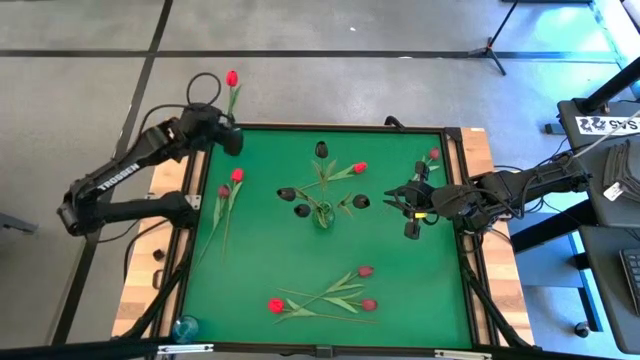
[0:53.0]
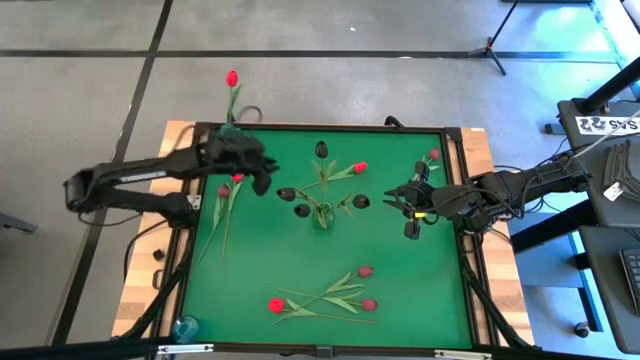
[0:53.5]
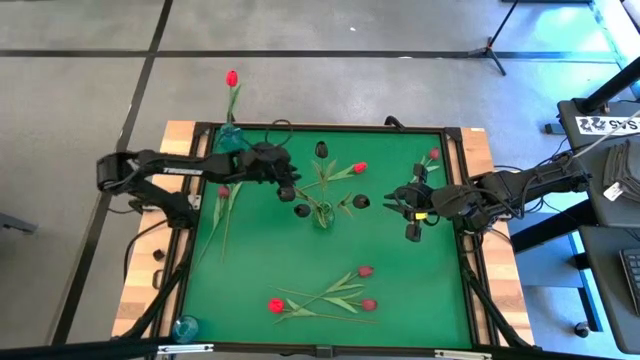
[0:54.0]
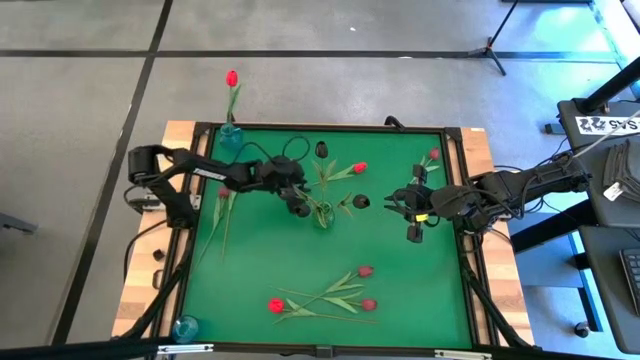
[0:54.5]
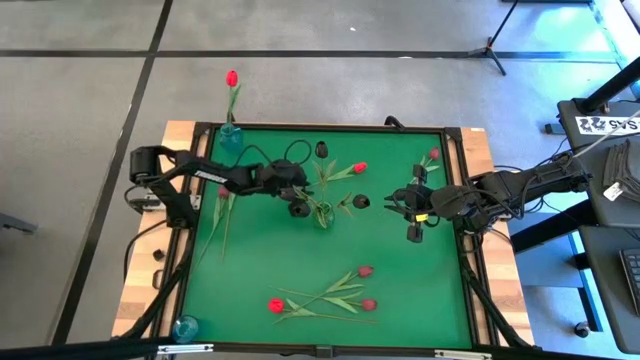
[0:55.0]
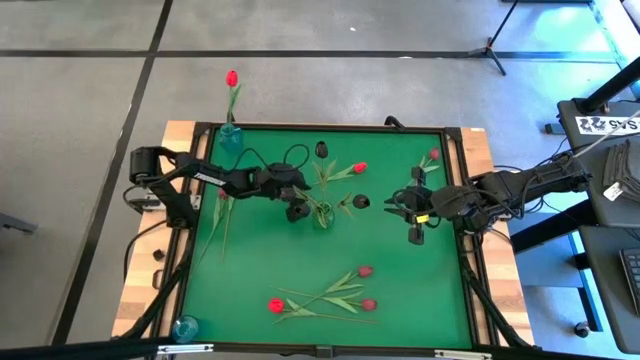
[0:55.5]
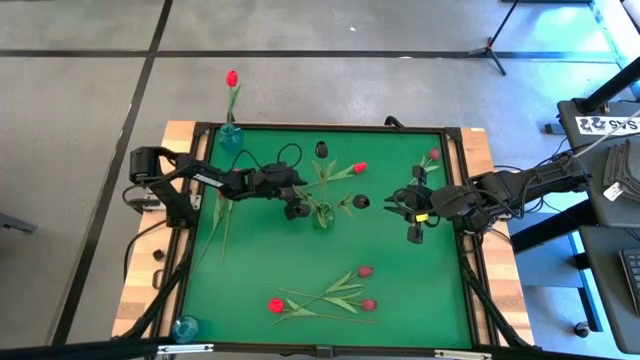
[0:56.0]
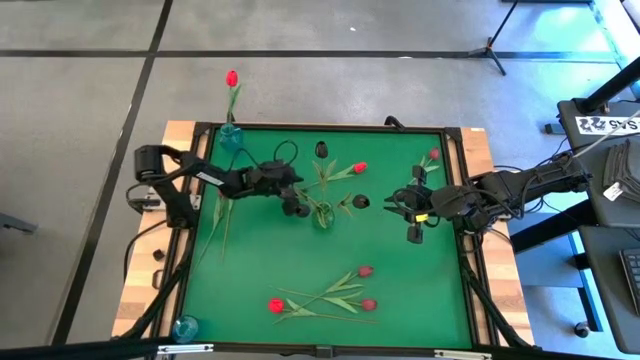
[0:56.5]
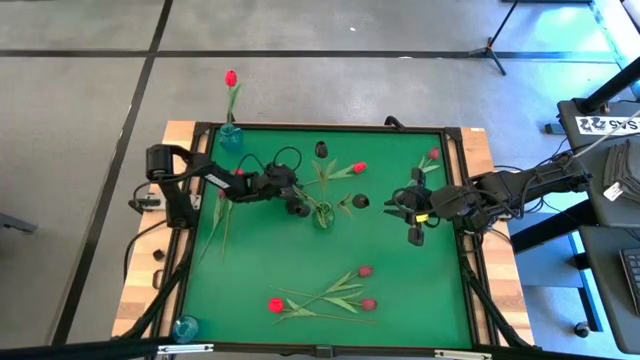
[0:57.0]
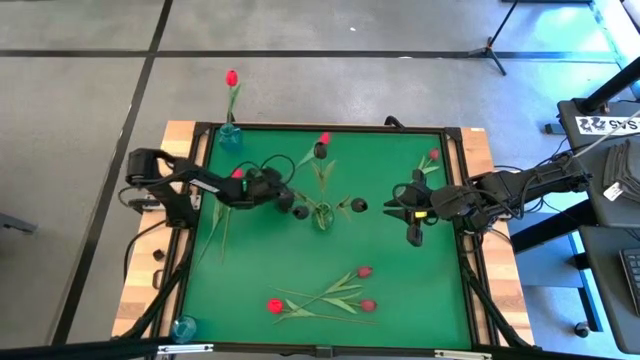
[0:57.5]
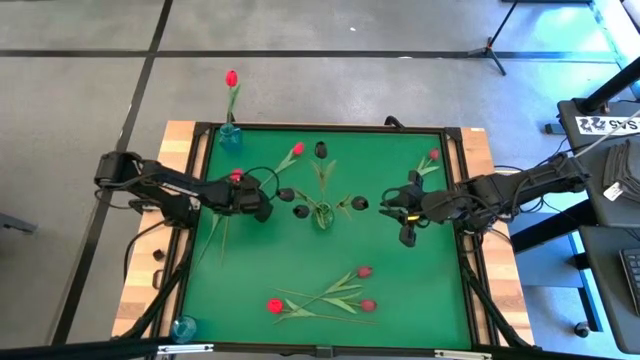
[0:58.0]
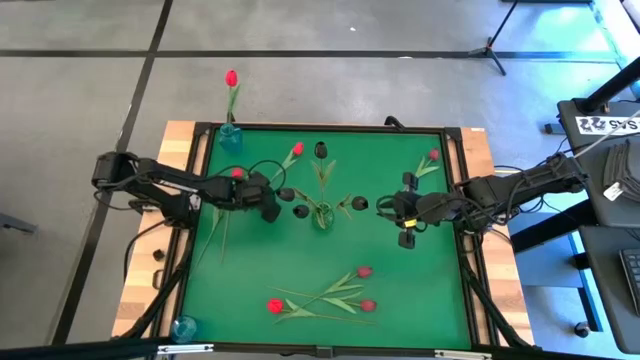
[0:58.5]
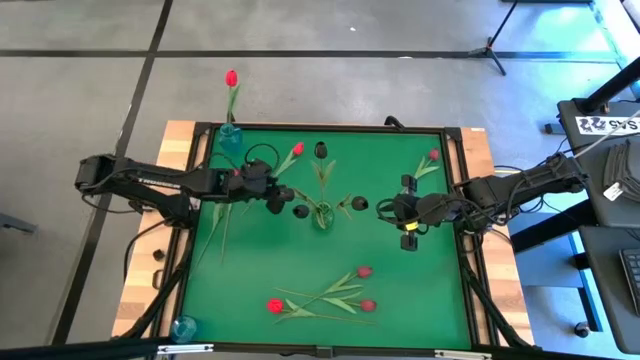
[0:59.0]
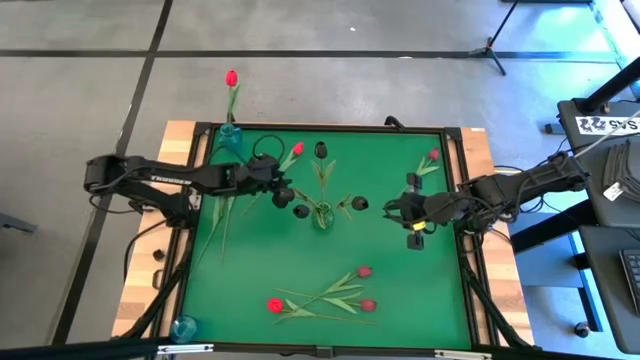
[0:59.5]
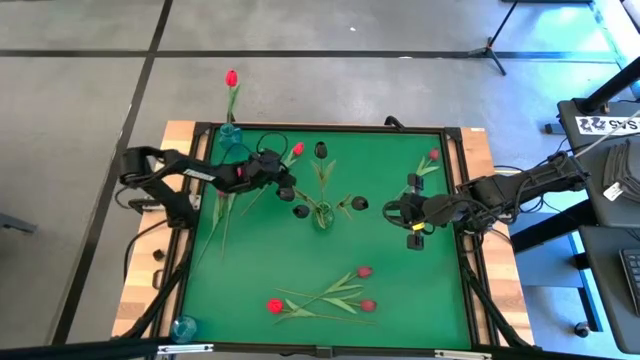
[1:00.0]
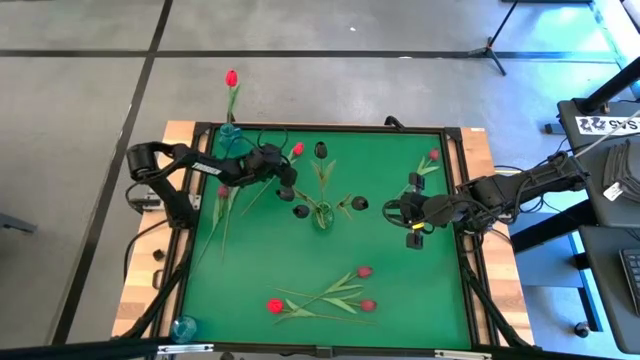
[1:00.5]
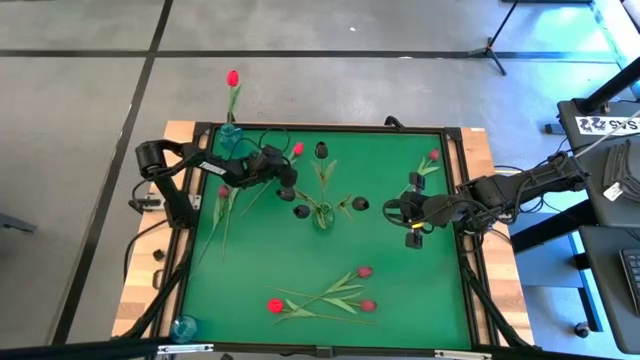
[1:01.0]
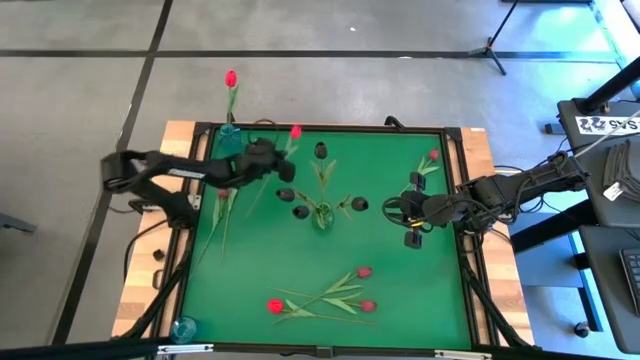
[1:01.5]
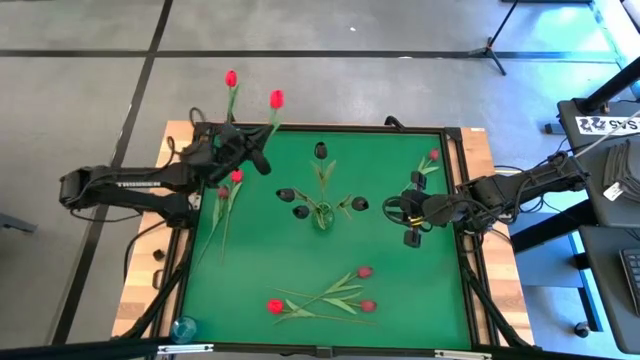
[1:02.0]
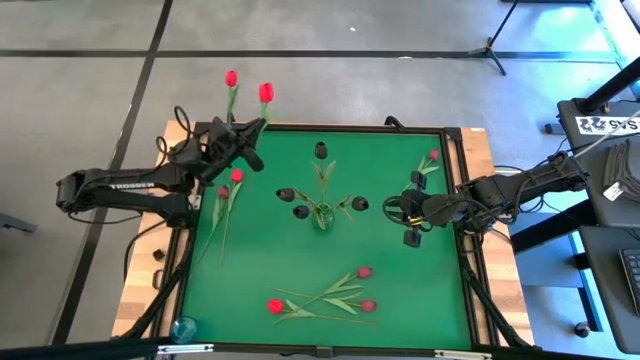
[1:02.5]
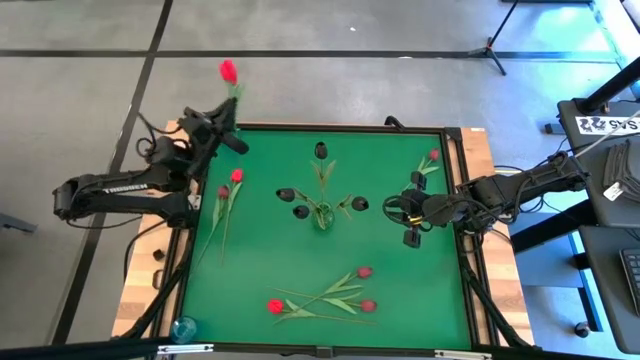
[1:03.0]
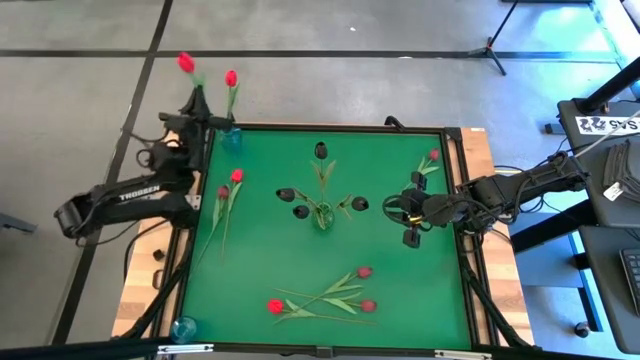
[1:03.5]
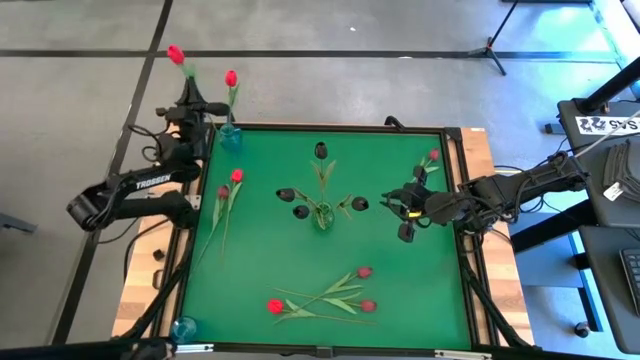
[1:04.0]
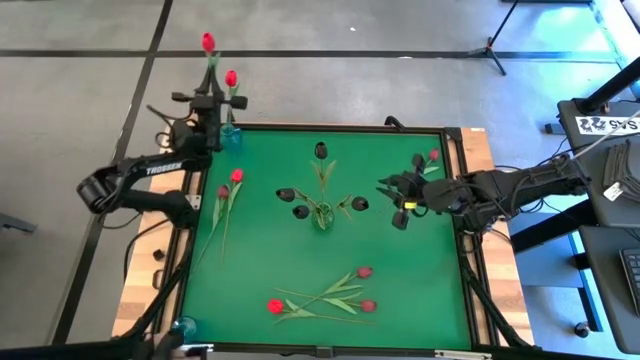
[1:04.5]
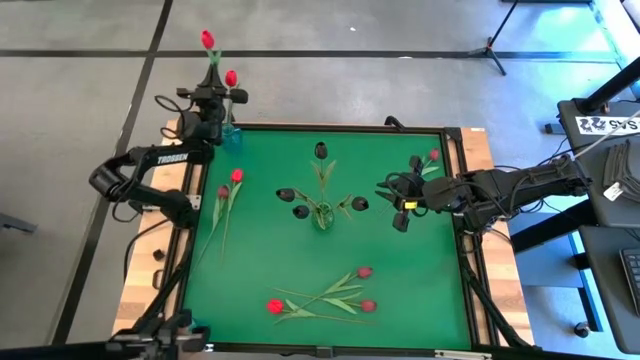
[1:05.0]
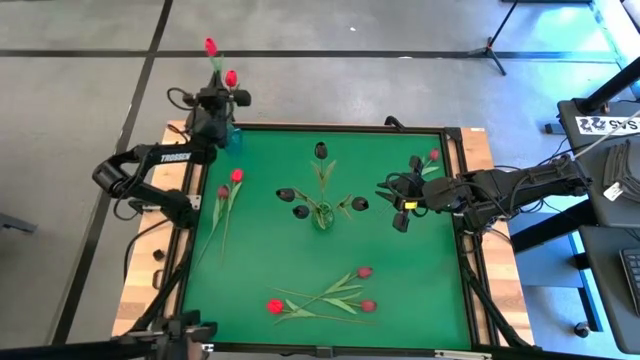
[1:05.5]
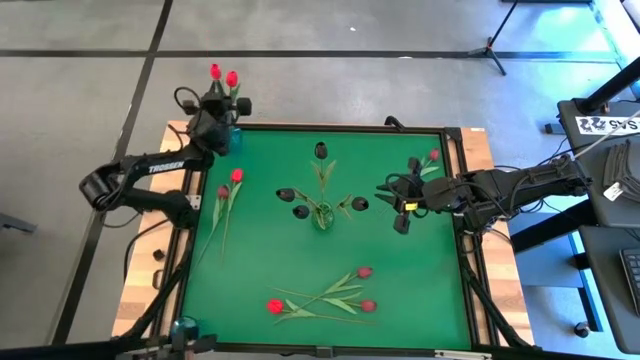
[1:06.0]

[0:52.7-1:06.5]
Task: Sort flowers into vase by color
Put the red tulip into the top blue vase

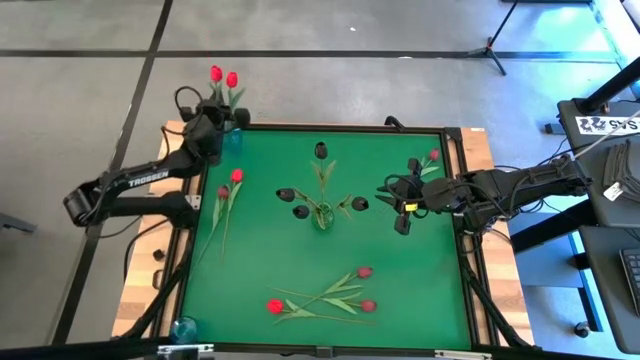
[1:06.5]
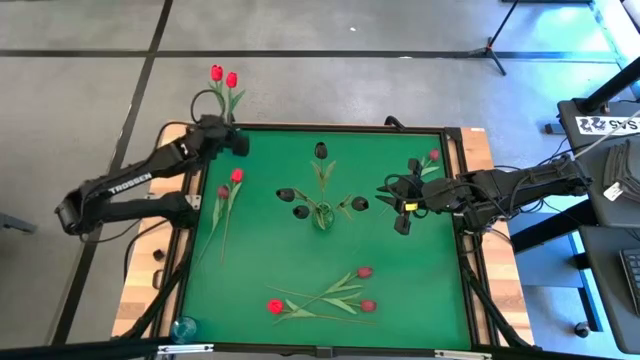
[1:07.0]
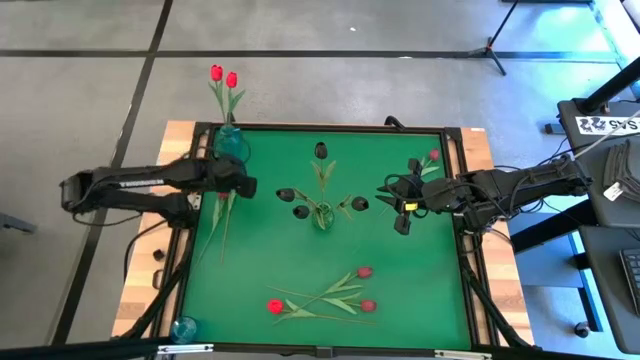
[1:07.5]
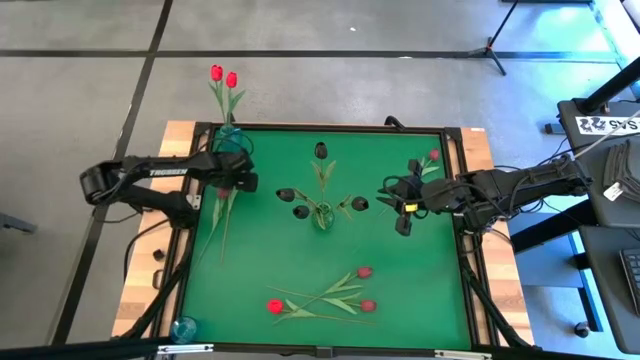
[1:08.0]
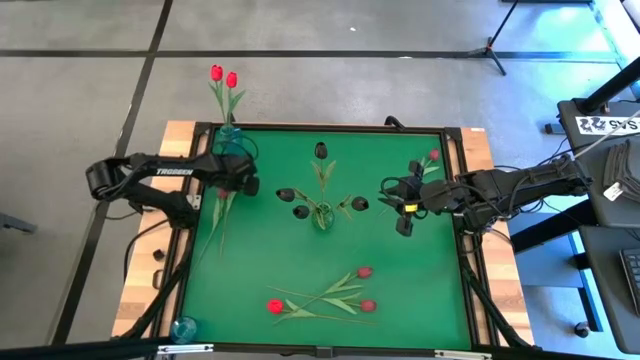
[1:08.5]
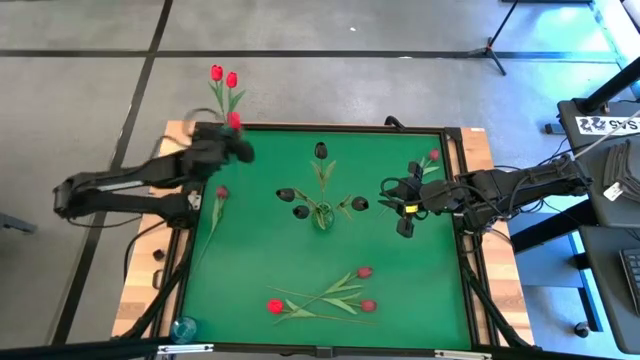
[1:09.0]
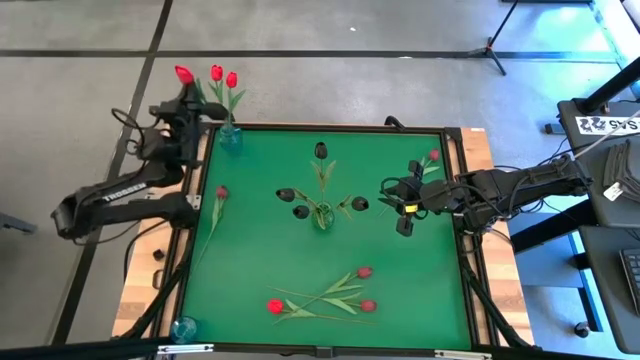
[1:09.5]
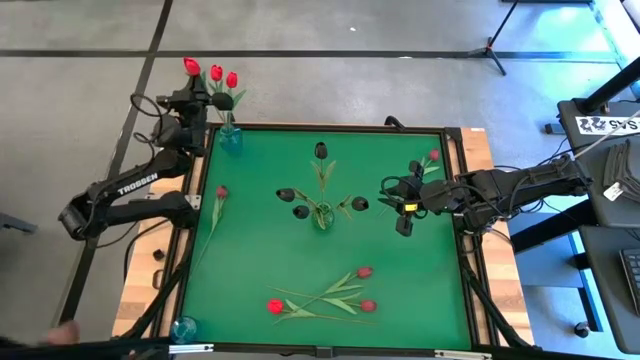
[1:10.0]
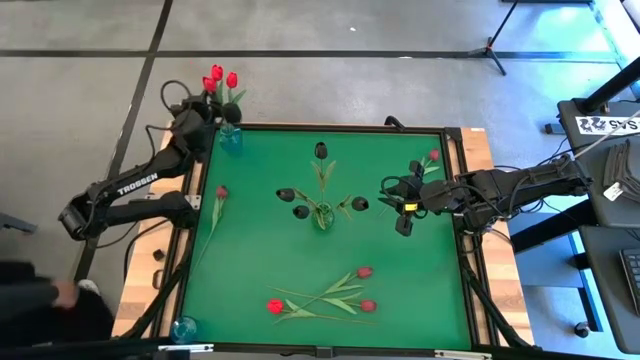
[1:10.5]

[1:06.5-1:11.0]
Put the red tulip into the top blue vase

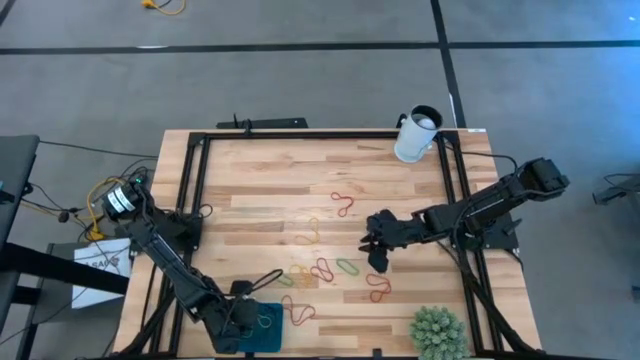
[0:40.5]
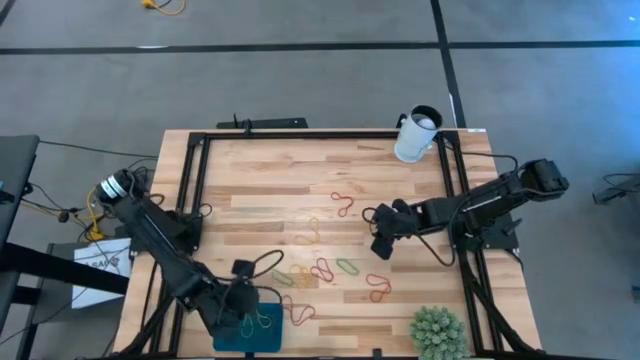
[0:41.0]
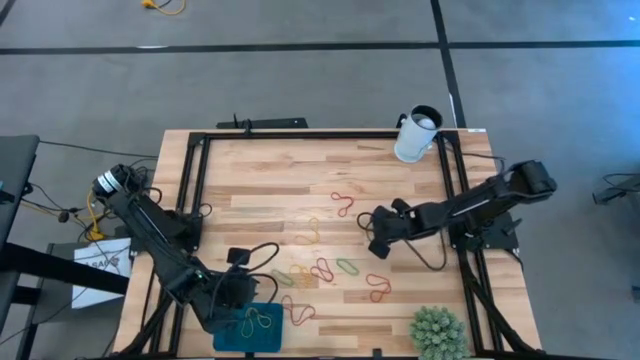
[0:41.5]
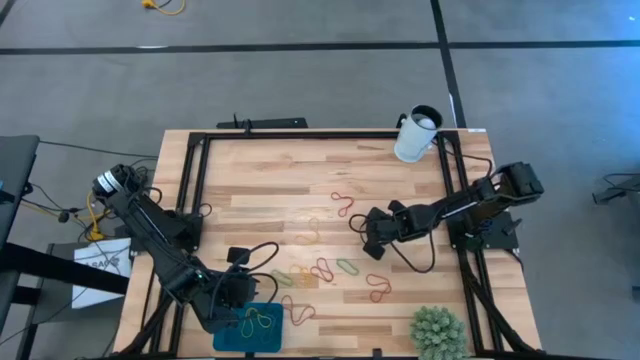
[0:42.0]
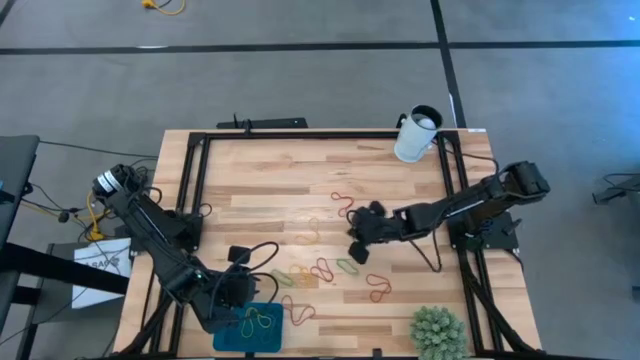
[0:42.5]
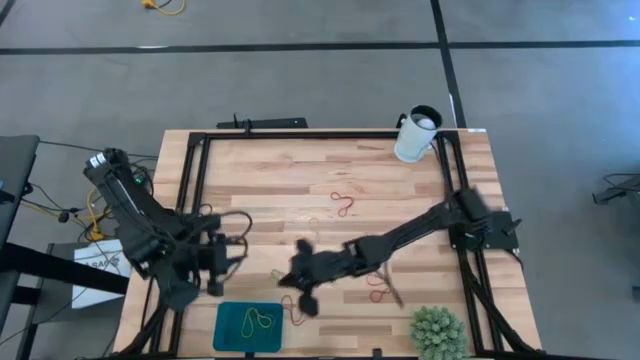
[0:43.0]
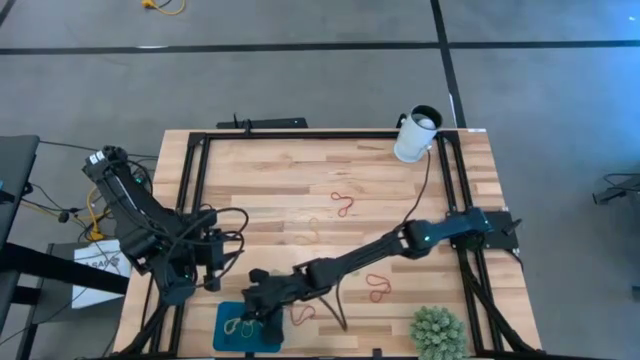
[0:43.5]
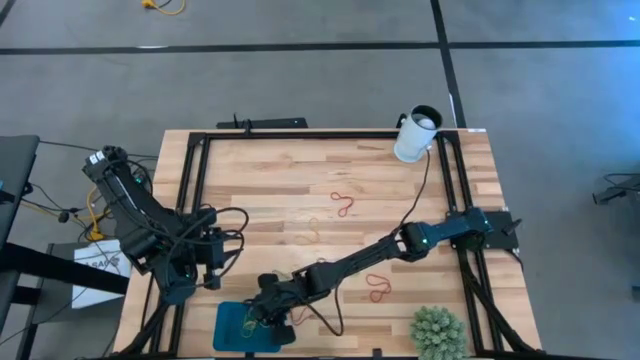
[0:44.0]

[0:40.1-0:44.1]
Task: Pick and place items into bin
Put the yellow rubber band into the blue bin
